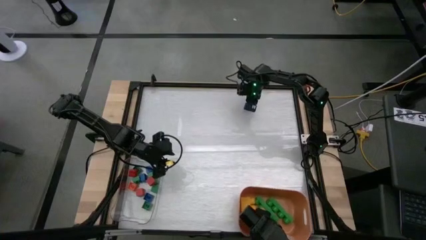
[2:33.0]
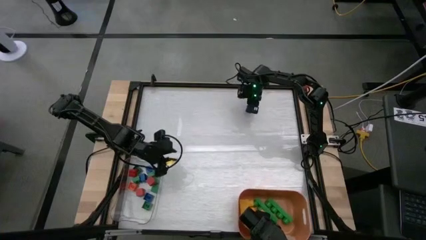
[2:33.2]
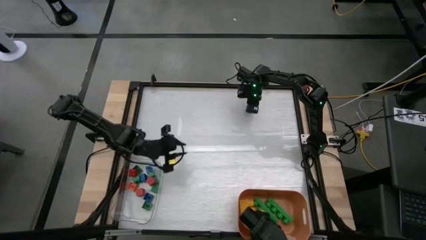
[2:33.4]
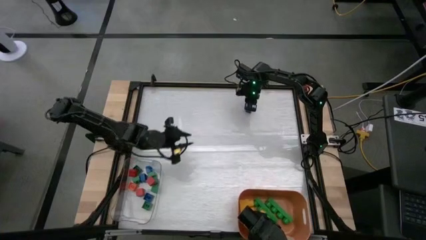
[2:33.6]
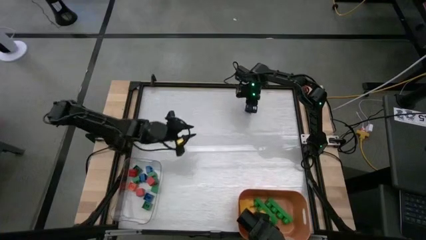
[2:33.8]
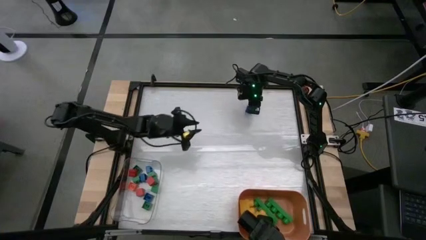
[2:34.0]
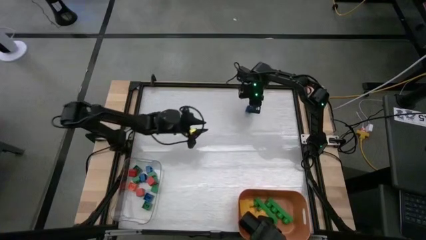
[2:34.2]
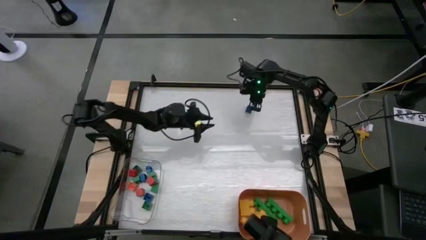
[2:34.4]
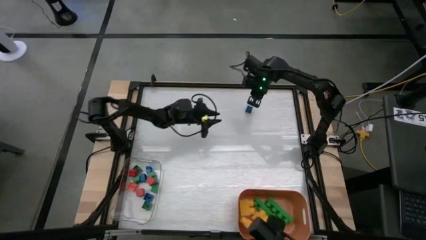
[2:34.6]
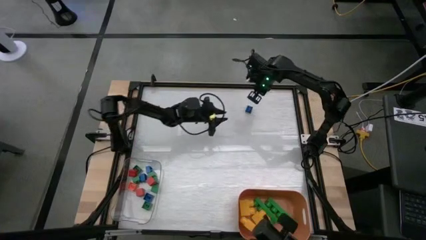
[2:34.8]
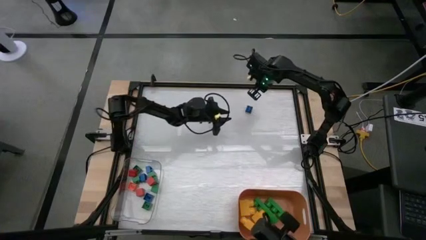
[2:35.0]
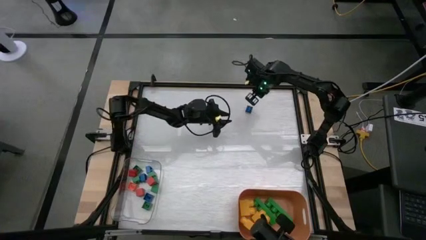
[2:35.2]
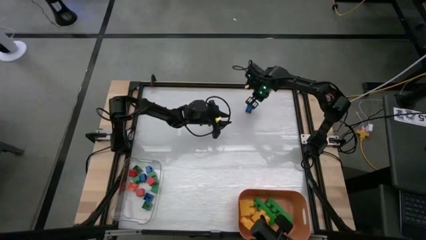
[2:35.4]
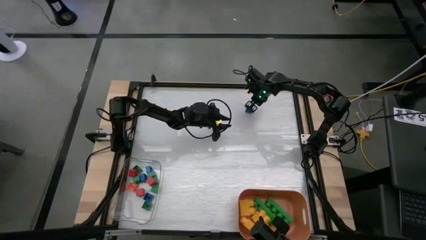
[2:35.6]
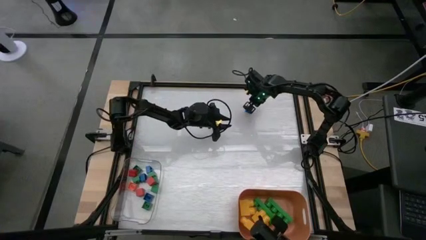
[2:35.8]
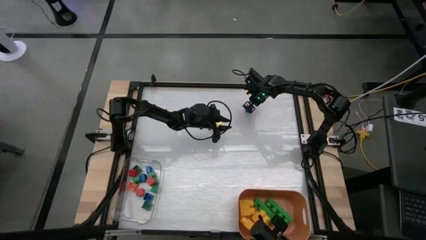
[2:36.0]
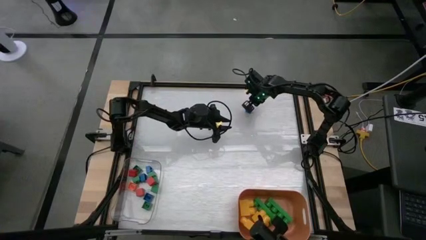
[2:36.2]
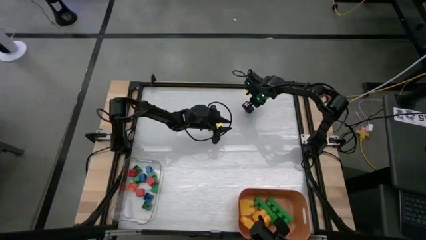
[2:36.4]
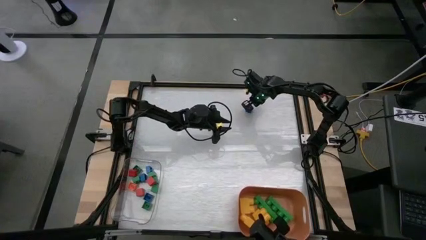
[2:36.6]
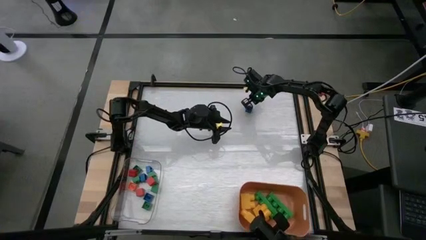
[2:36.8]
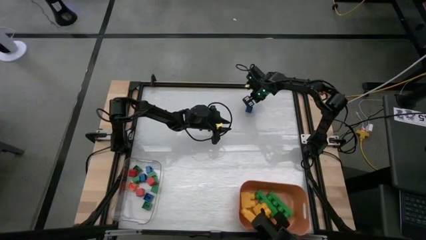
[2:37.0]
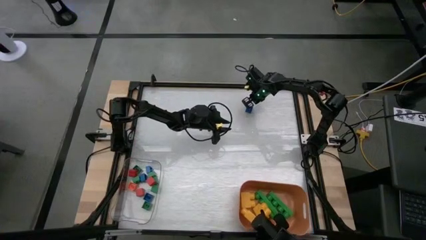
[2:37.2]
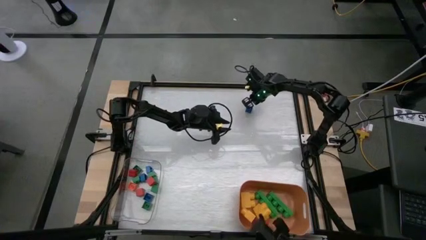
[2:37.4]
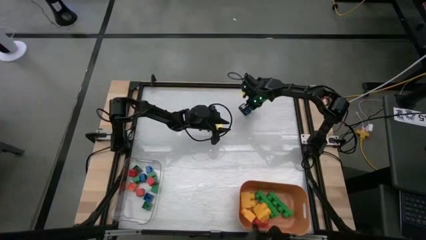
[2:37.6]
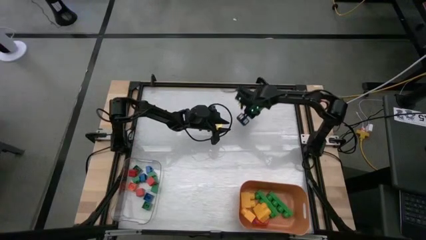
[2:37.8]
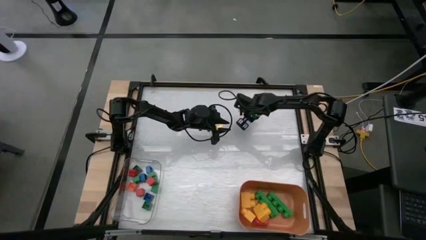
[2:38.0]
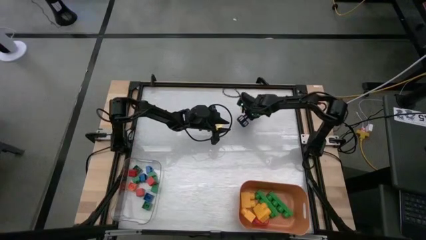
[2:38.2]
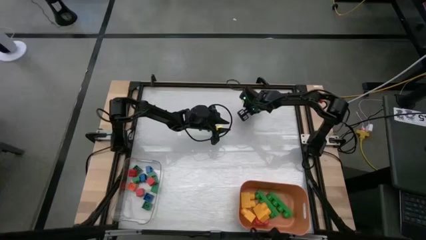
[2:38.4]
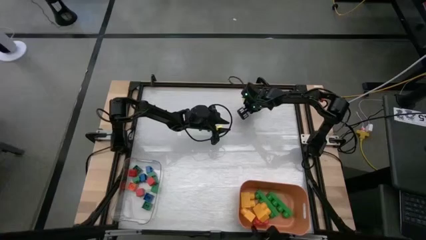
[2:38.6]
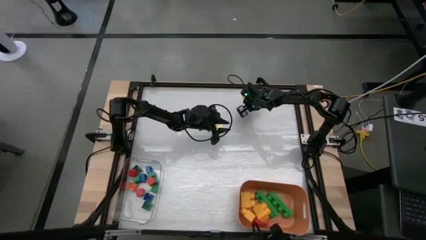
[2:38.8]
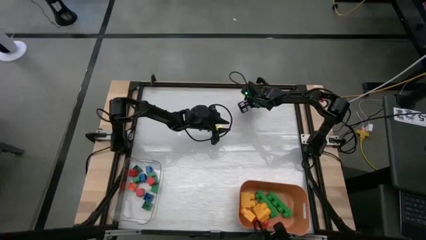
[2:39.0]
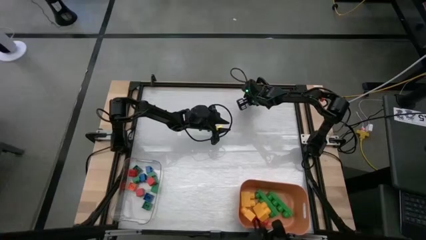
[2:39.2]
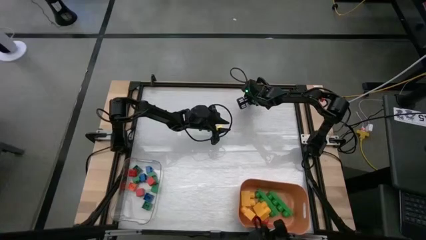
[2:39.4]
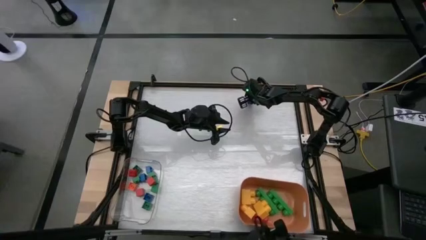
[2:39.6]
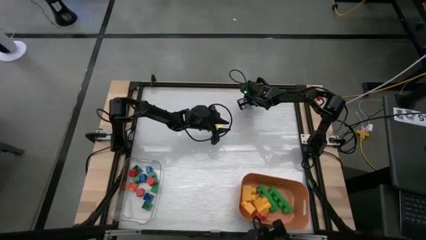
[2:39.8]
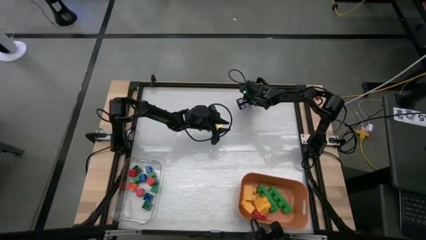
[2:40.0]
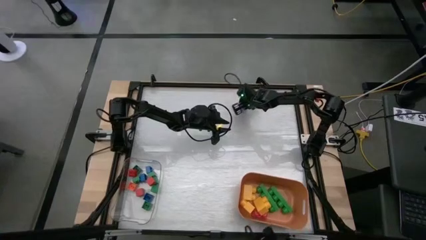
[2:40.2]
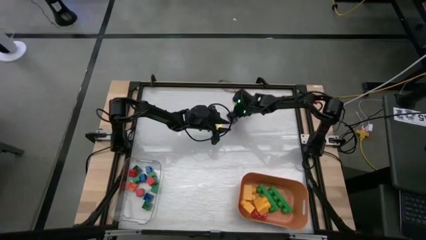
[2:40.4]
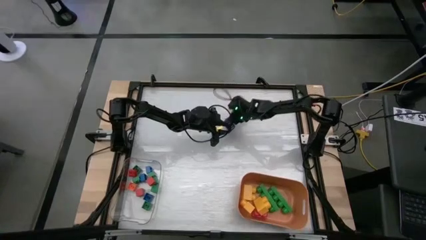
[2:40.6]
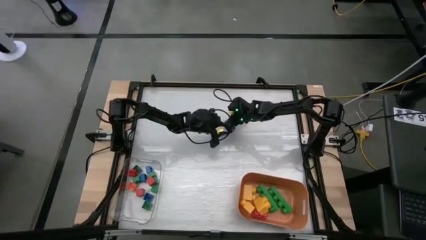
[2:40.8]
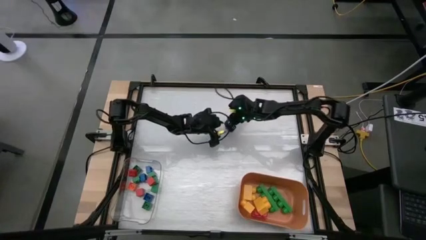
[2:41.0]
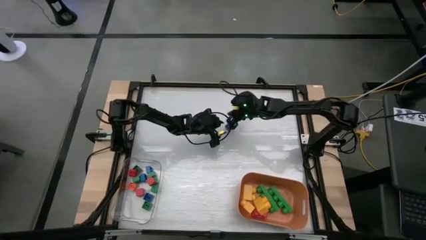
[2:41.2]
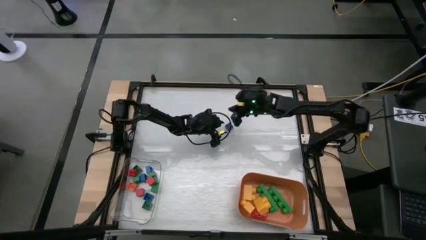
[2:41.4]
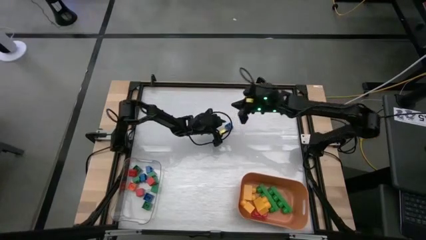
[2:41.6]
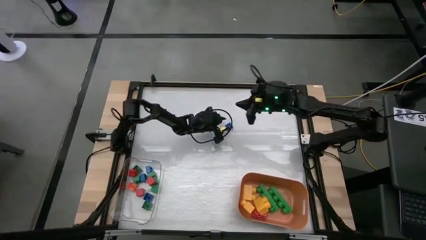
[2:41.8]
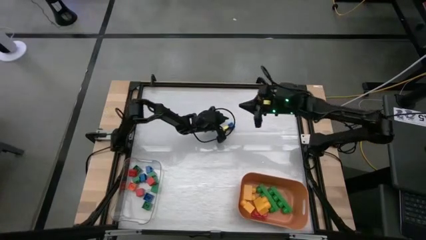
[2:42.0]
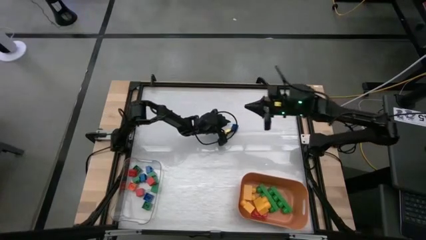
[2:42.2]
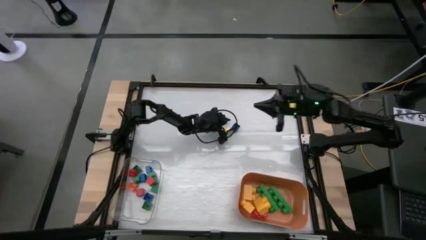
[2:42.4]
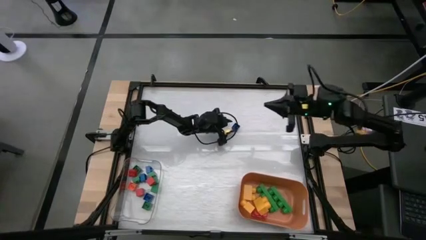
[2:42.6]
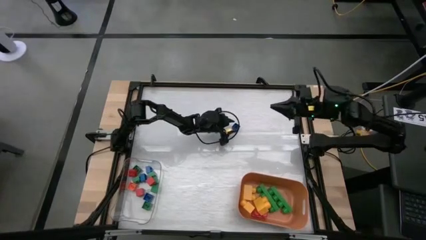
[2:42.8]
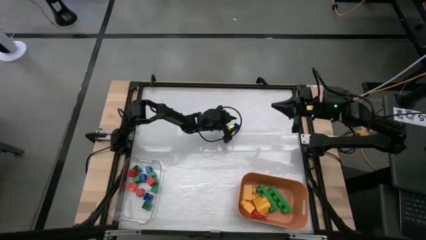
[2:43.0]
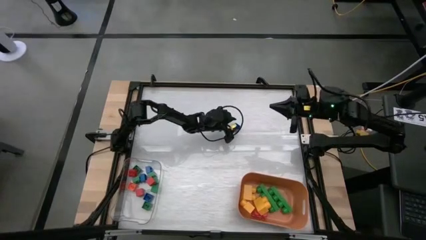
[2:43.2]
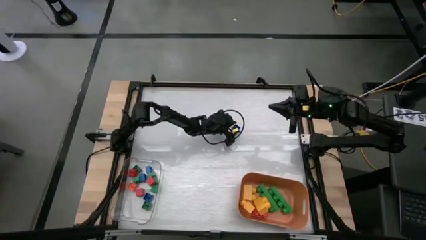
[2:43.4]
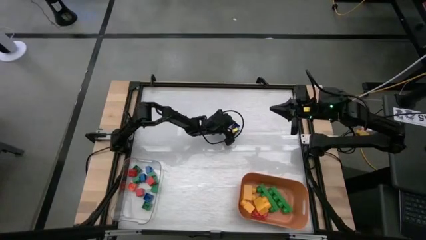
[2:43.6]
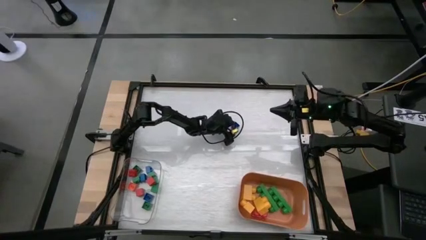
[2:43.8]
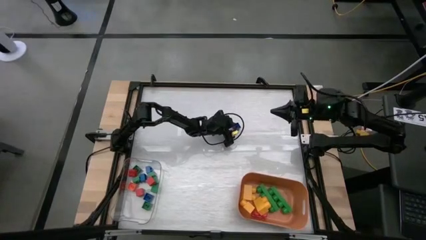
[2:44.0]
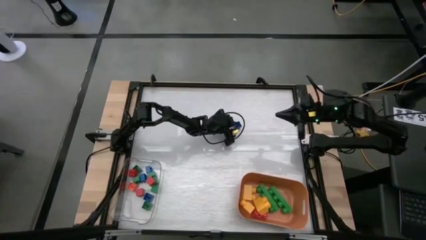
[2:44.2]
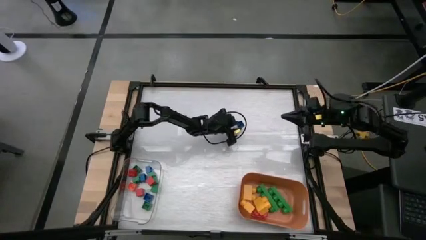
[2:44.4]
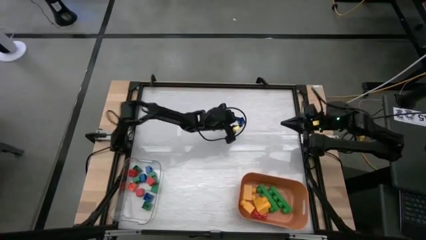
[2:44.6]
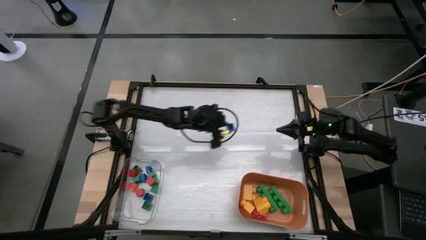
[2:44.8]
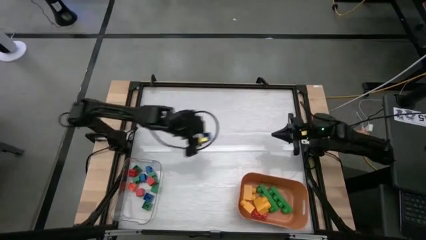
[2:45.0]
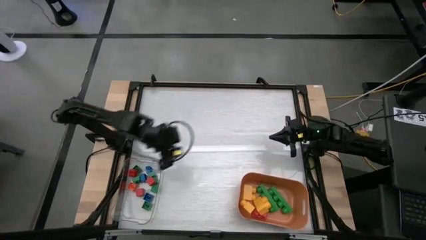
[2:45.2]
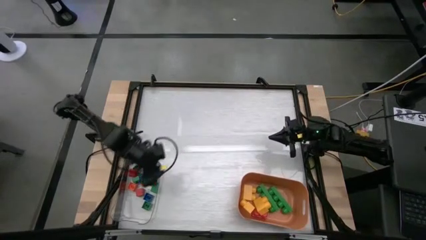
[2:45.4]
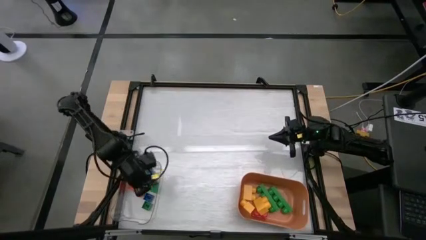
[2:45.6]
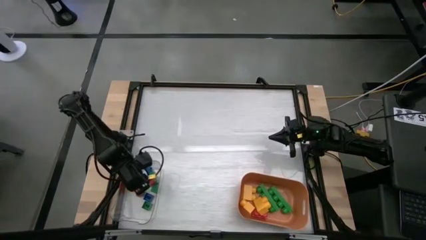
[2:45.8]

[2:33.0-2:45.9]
Task: Sort blocks by size
Put the small blue game piece into the transparent bin

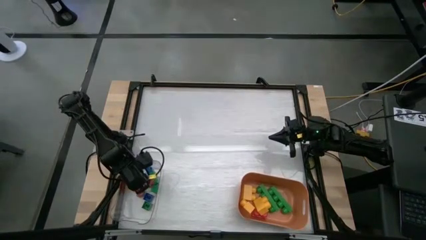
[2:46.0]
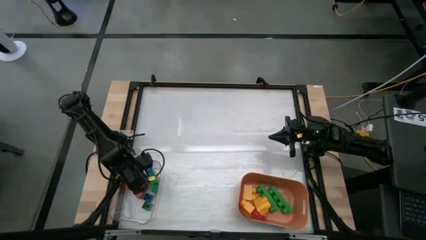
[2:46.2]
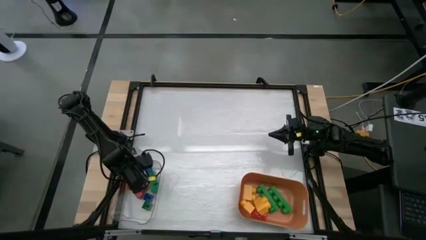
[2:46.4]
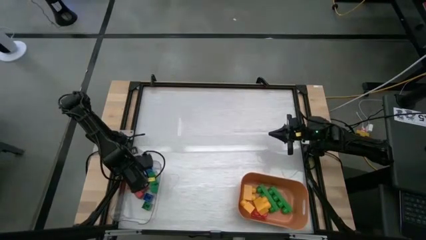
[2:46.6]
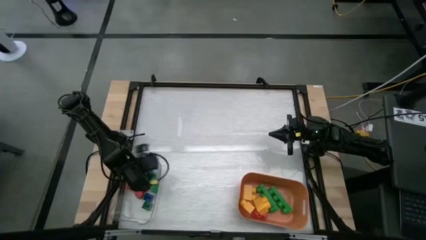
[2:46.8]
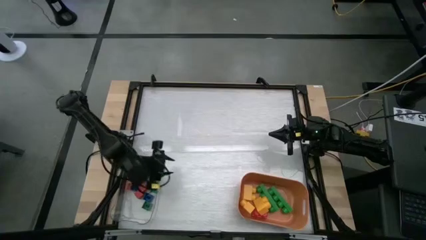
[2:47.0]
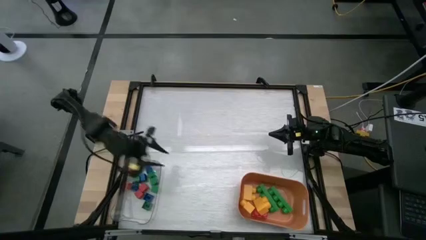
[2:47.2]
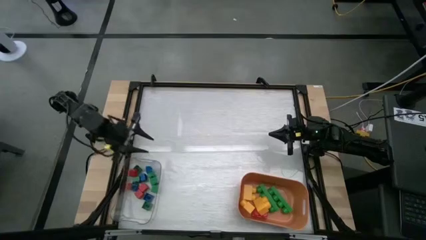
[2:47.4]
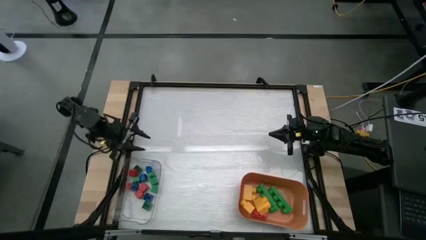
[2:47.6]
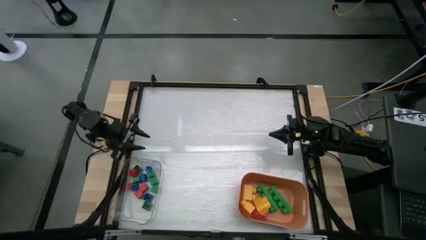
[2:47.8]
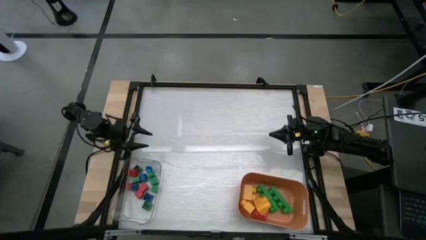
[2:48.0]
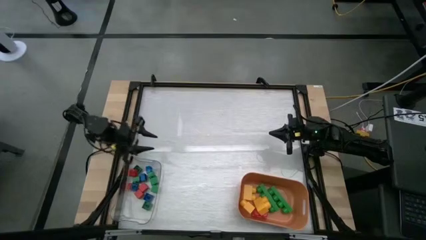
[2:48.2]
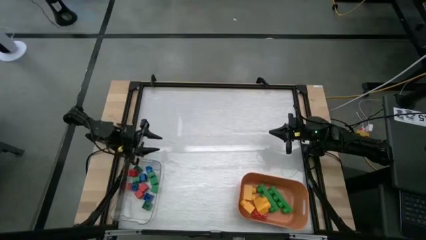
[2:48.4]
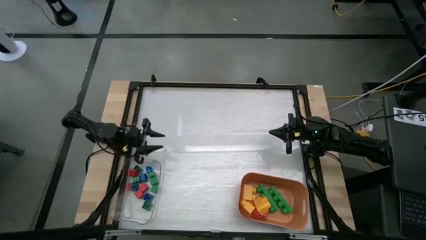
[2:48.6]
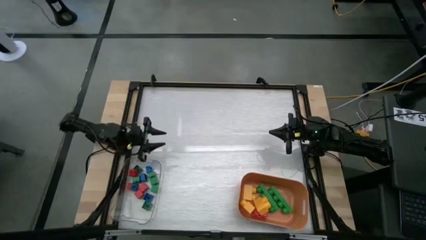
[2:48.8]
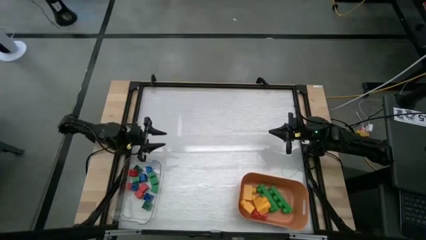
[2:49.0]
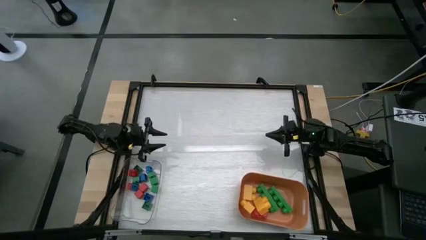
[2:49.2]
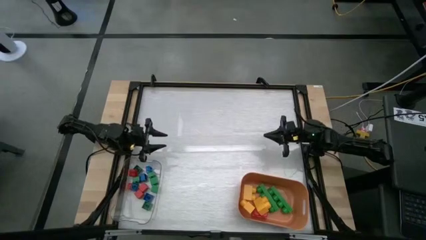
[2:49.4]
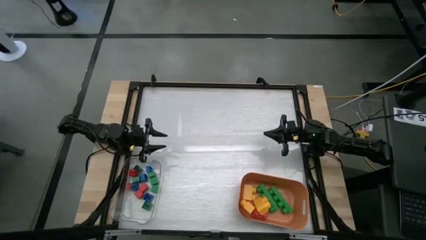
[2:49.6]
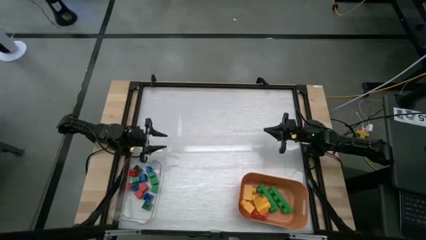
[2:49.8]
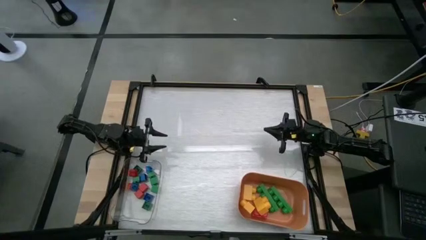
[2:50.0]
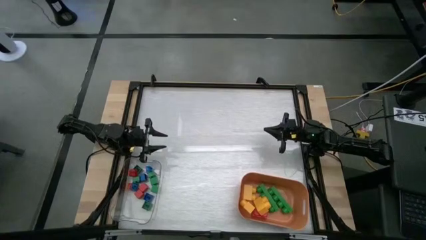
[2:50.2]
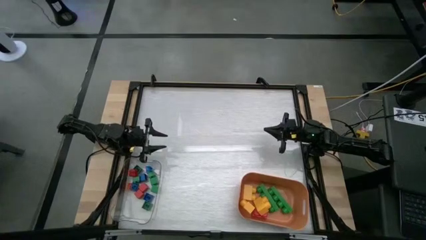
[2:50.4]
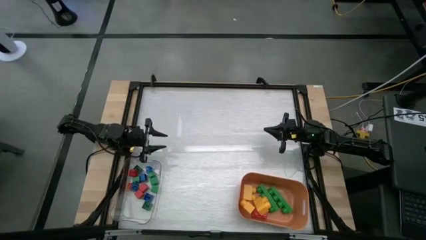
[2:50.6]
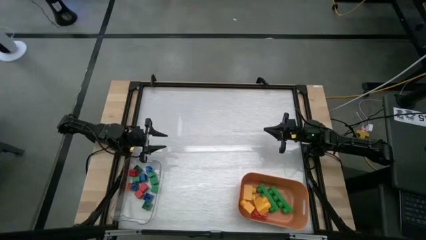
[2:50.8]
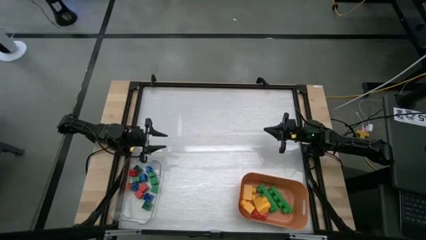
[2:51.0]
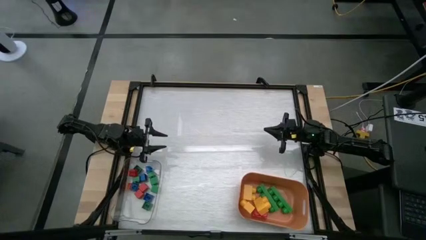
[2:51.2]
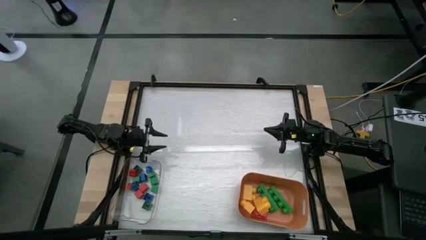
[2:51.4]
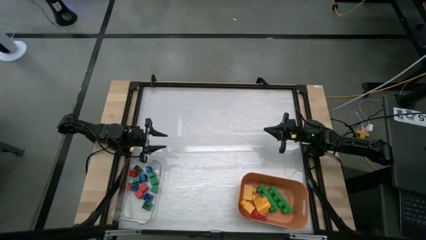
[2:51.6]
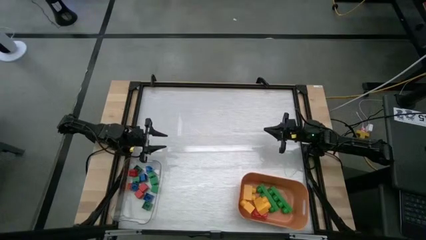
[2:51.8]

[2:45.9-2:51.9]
Return to Home Position
